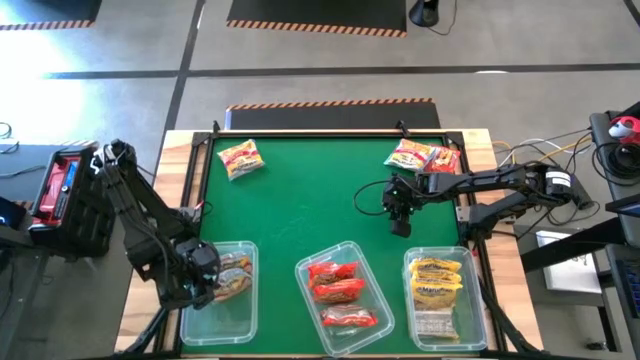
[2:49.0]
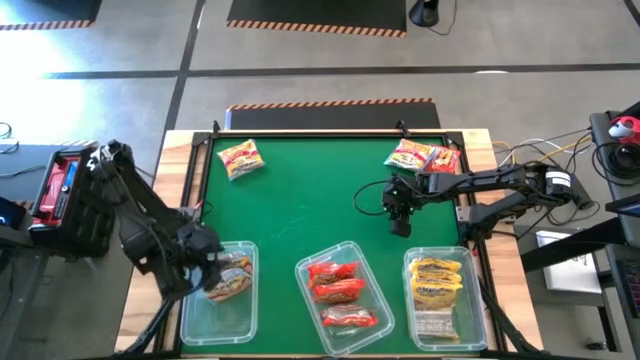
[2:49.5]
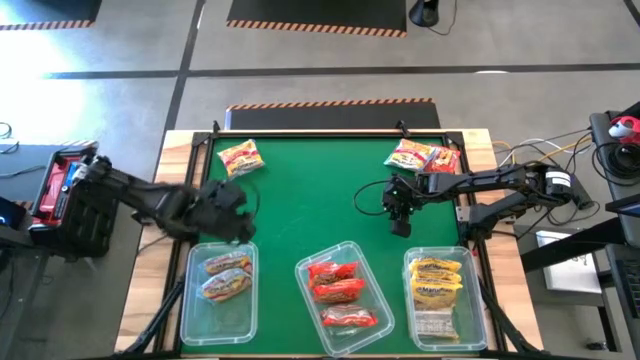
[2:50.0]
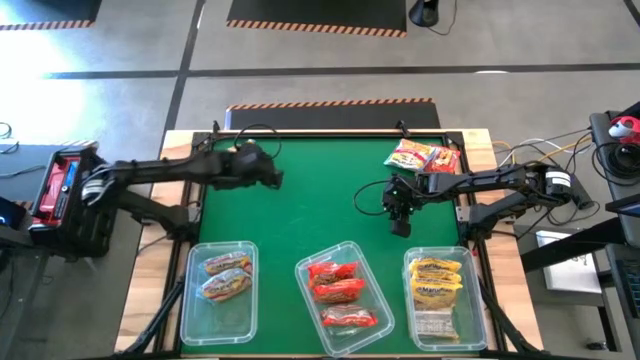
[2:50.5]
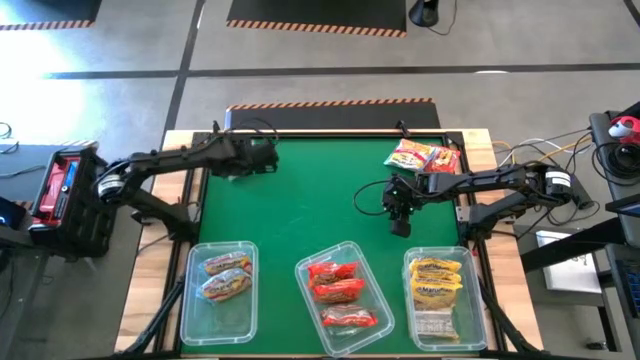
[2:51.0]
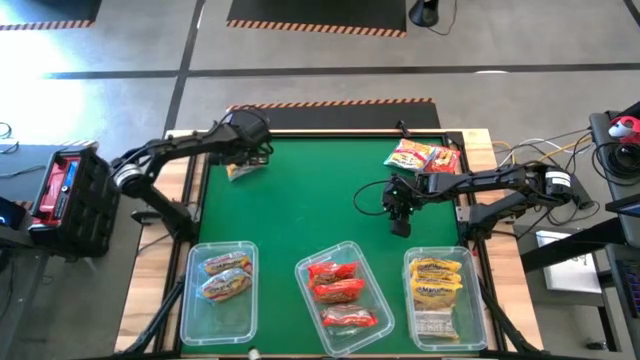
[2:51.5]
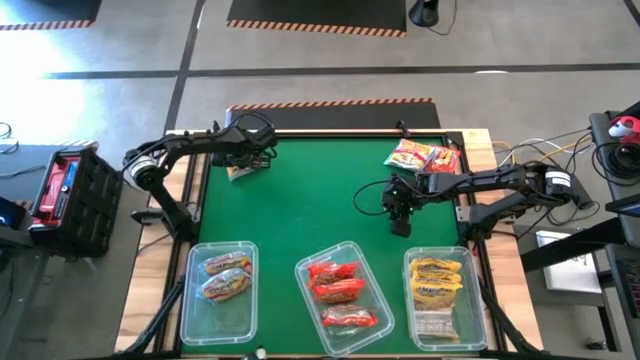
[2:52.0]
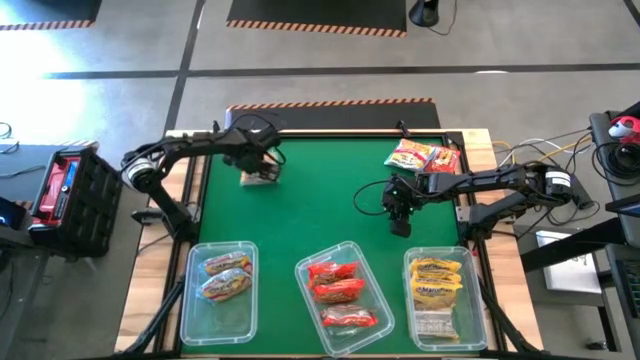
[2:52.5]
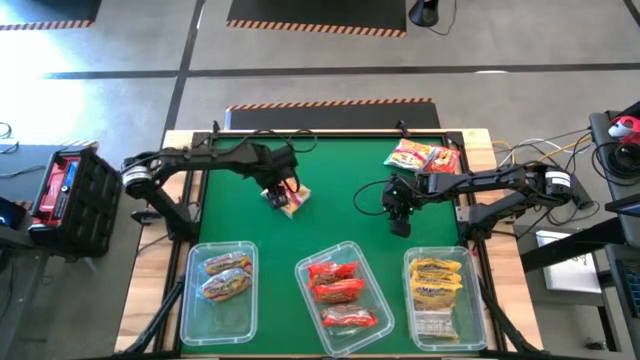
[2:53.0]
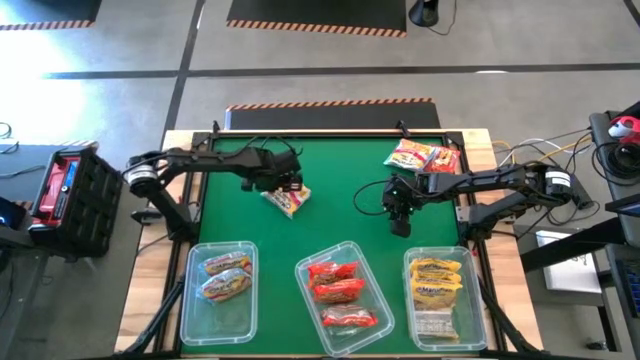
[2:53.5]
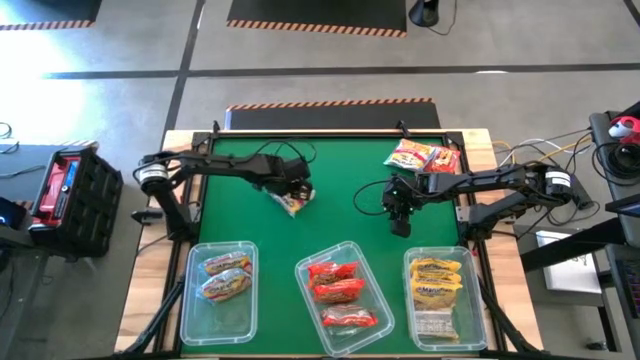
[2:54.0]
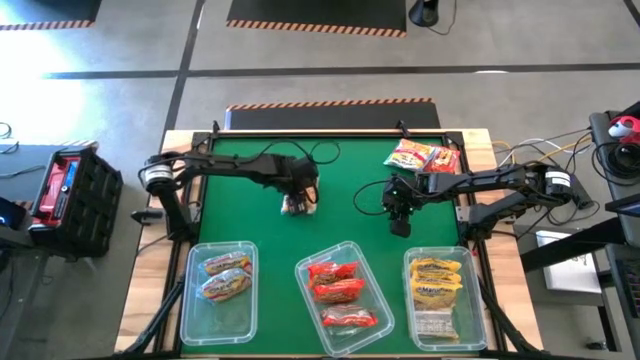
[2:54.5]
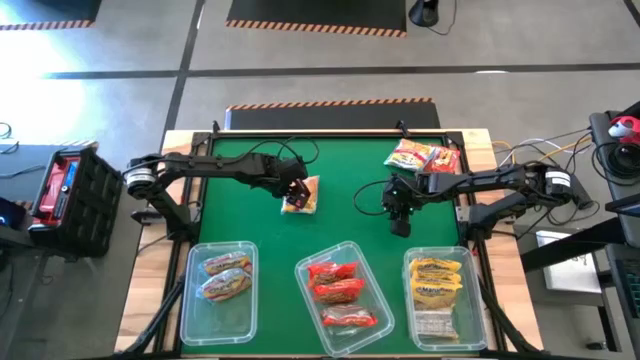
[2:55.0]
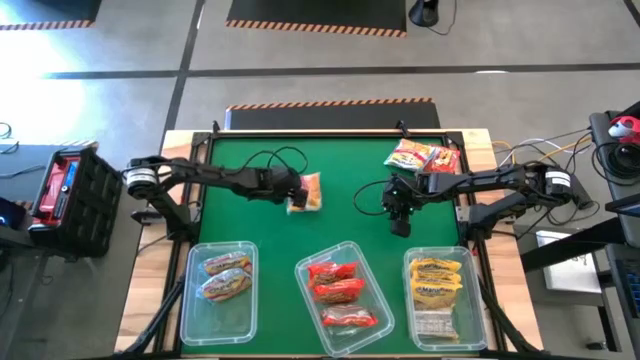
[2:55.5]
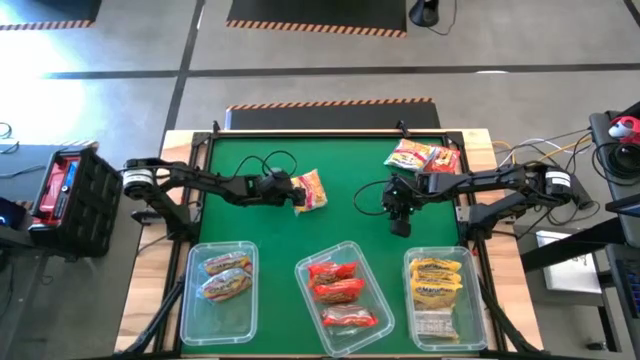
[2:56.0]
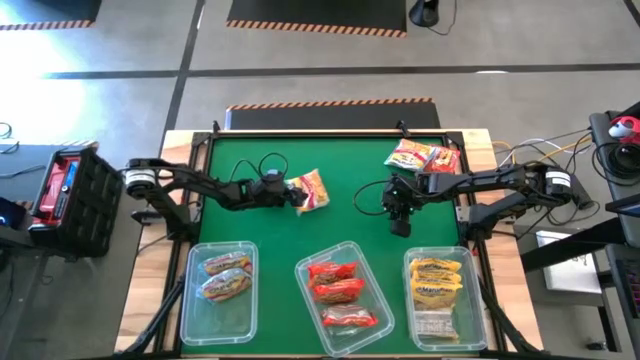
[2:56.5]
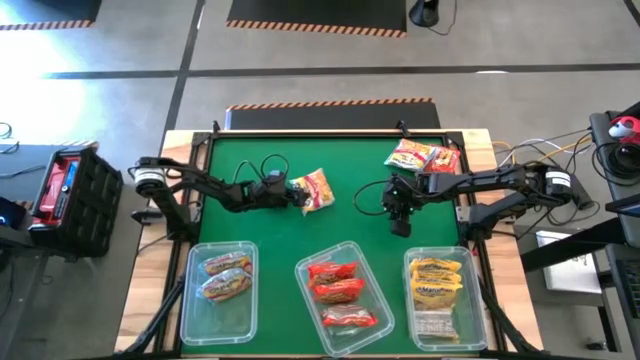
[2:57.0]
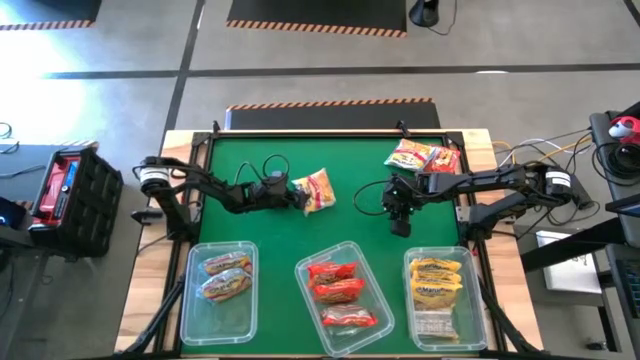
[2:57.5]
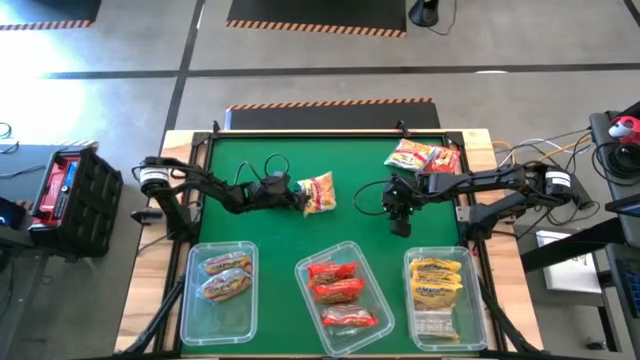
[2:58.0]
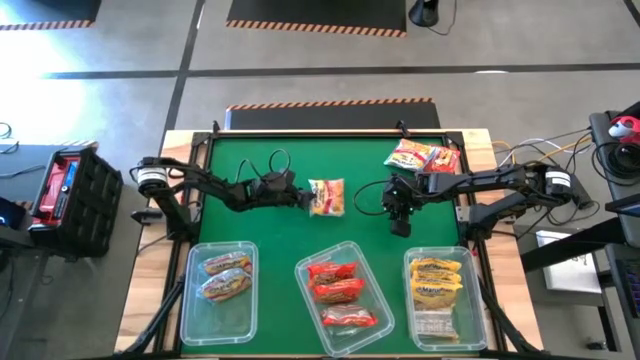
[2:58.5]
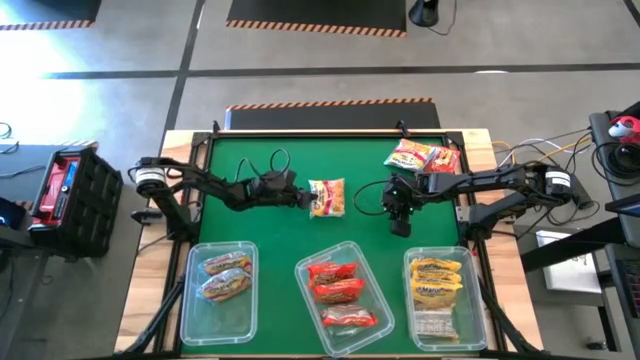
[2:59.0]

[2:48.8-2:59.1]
Task: Sort Maruchan noodles
Put the blue noodle pack into the left transparent bin

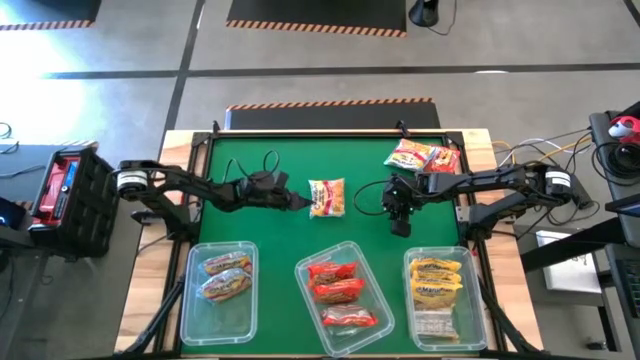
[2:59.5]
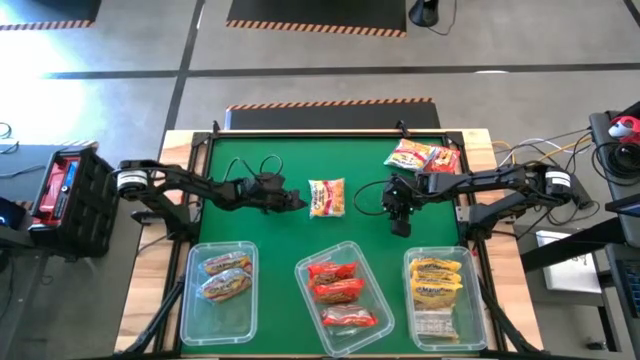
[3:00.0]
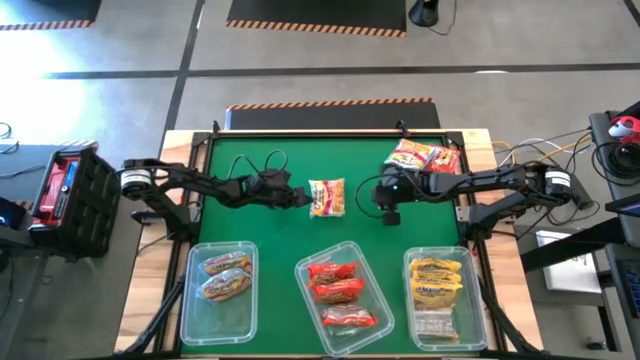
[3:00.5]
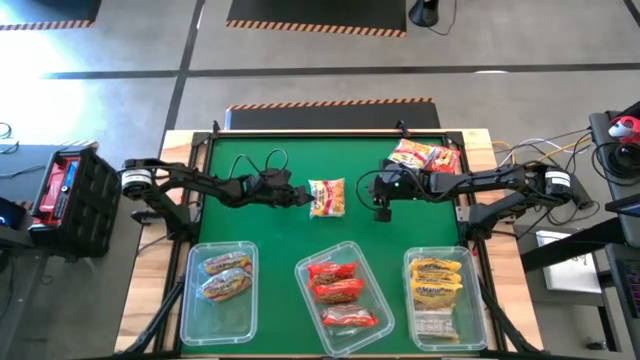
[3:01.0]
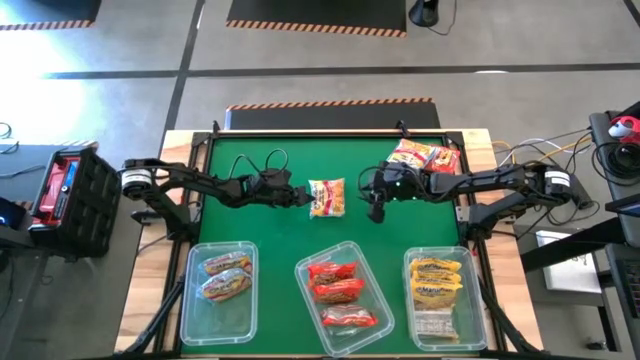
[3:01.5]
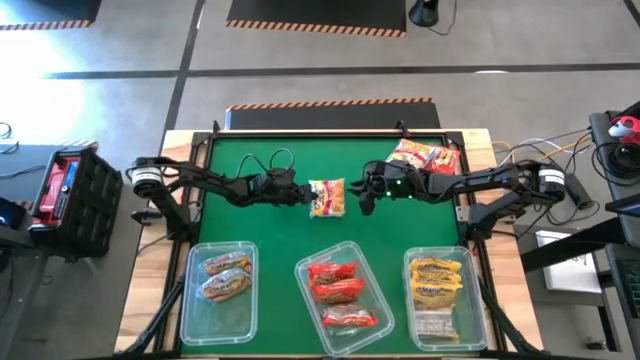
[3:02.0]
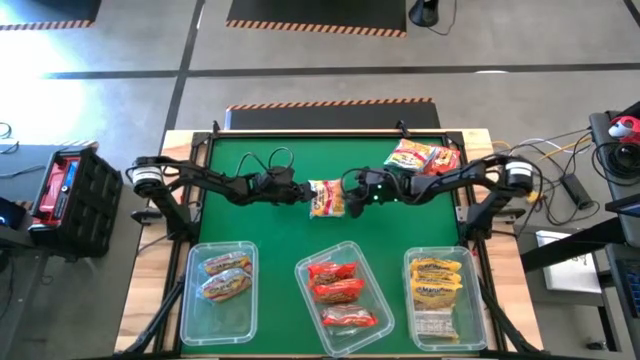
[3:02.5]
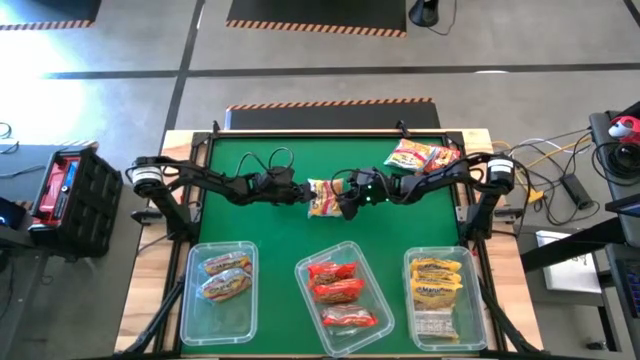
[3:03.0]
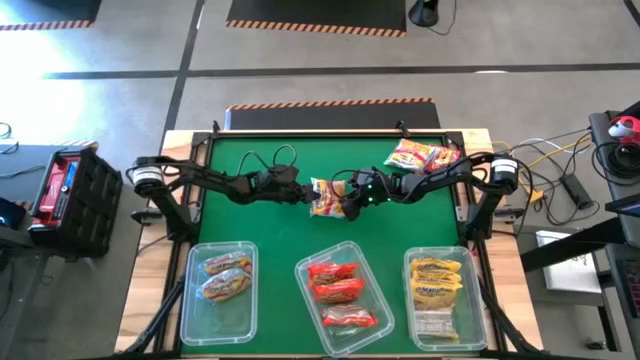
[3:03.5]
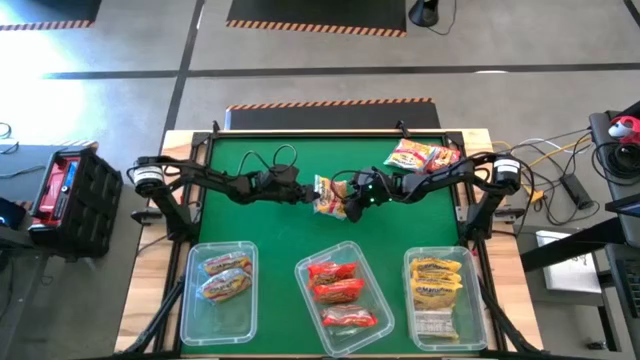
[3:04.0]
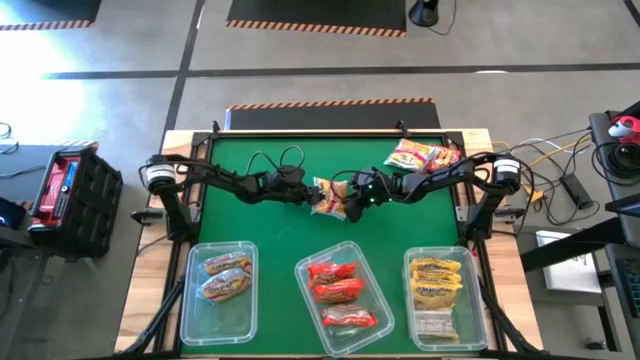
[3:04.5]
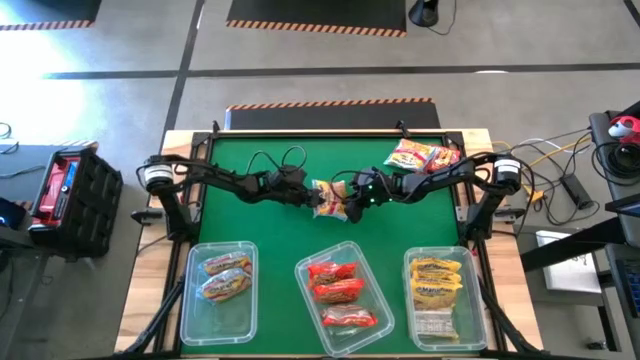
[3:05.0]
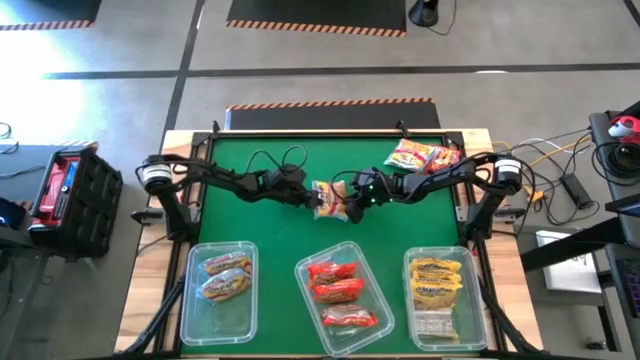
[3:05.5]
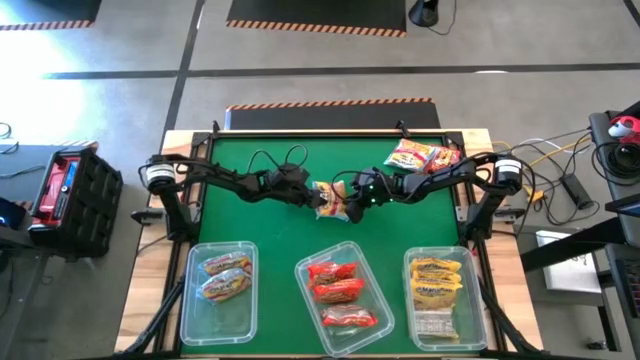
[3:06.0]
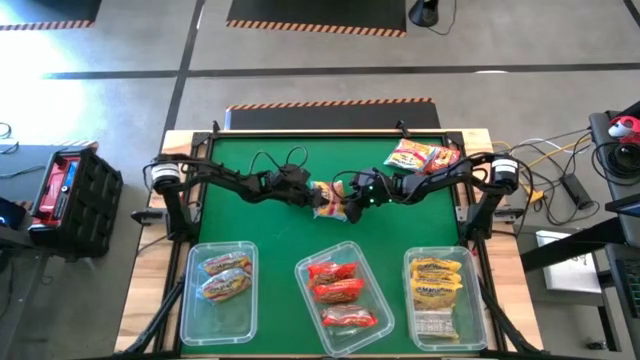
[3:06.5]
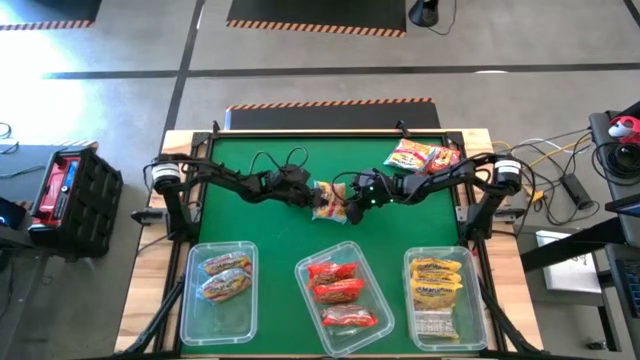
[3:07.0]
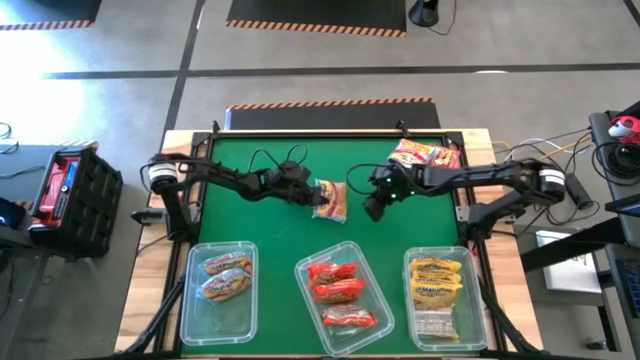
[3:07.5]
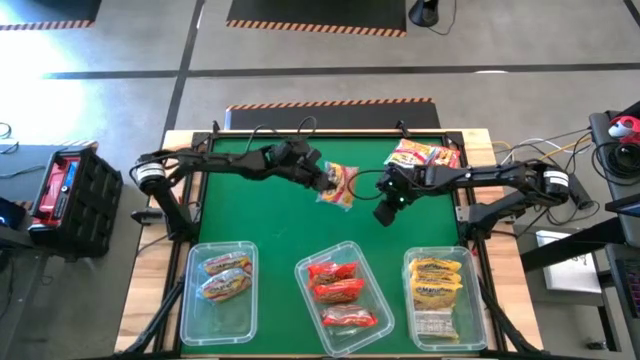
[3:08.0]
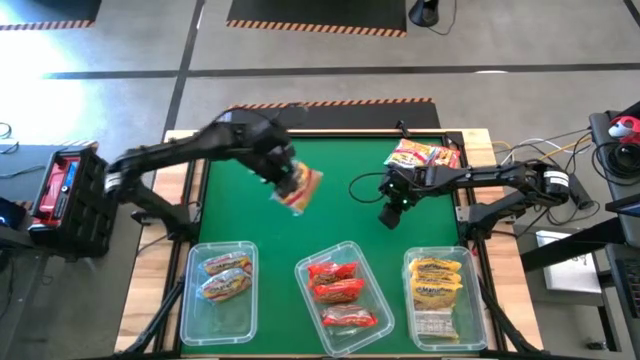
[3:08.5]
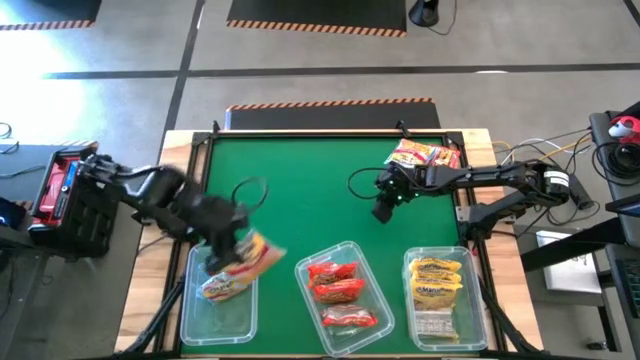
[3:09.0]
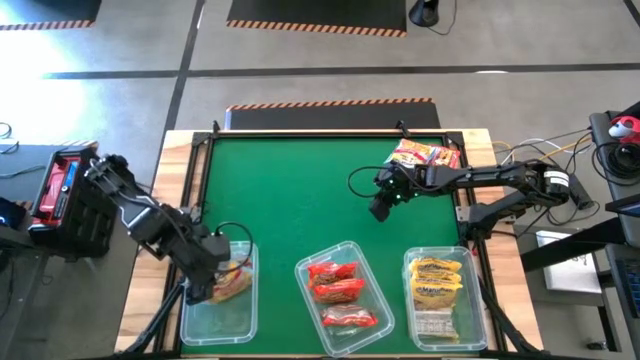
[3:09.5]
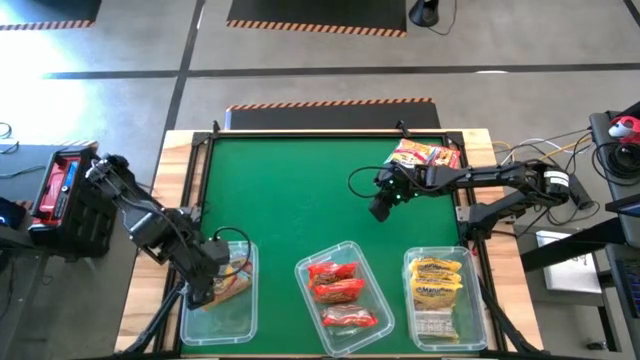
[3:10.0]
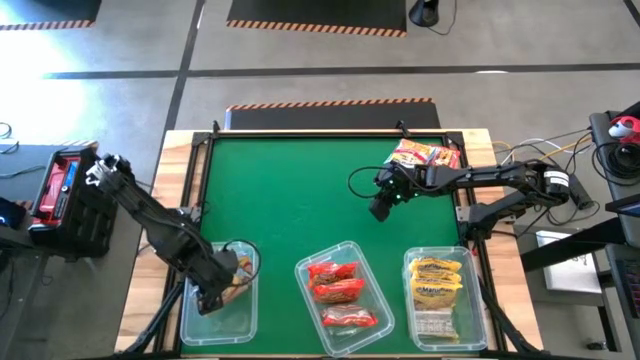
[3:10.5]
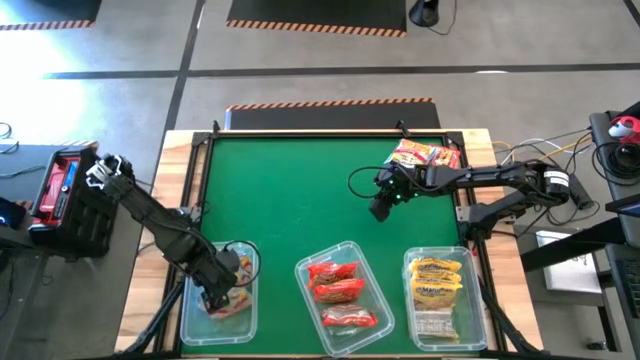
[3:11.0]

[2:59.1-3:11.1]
Put the blue noodle pack into the left transparent bin
